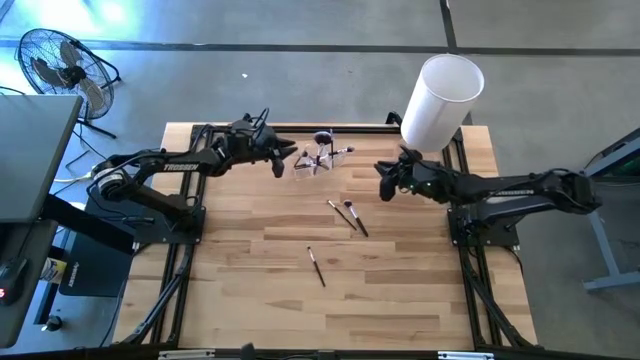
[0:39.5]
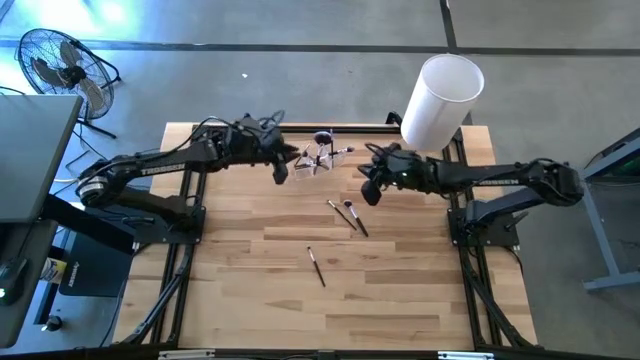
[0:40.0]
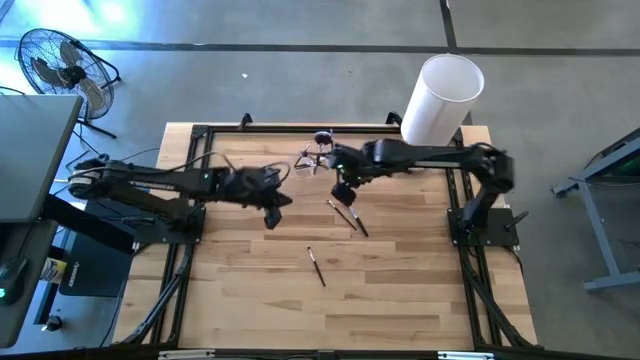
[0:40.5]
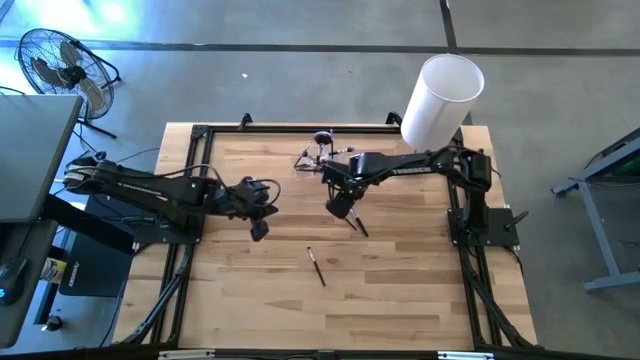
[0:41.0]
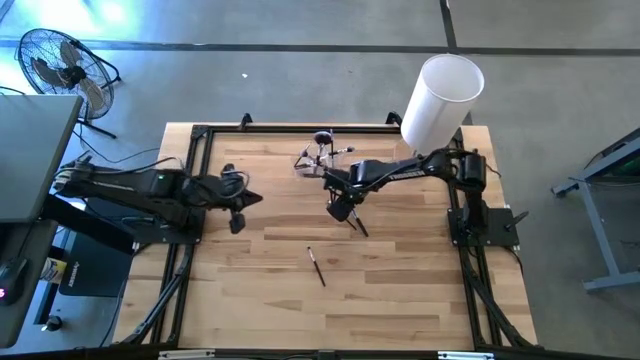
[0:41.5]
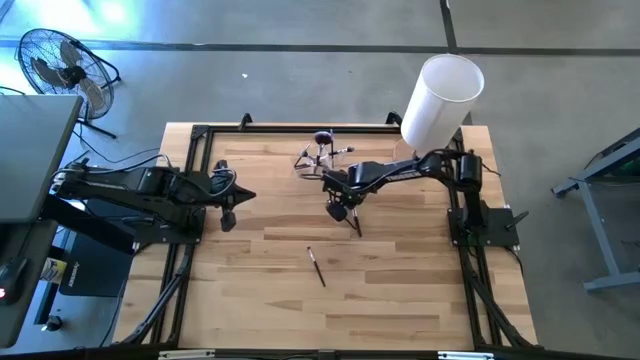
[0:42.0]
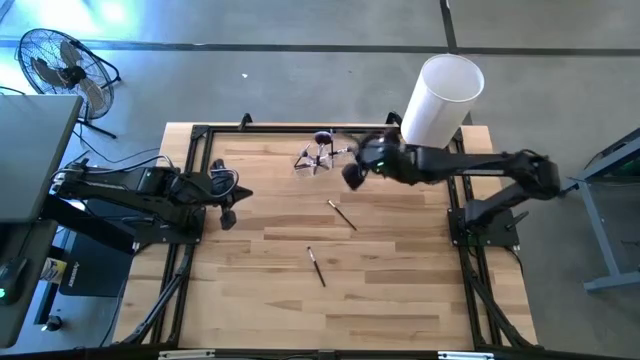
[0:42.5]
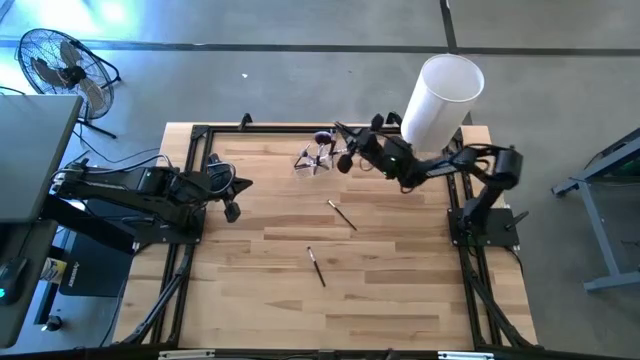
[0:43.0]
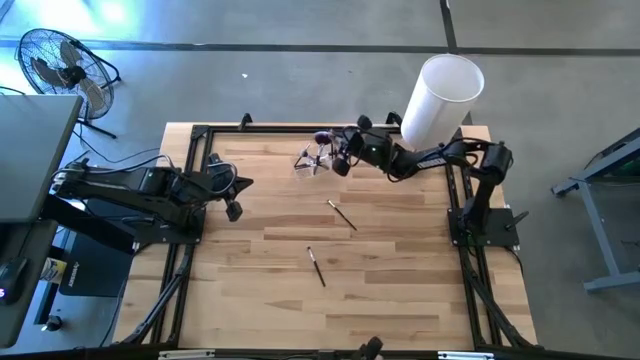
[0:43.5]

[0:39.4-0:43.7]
Task: Put items in baskets/containers
Put the black powder brush into the transparent organizer

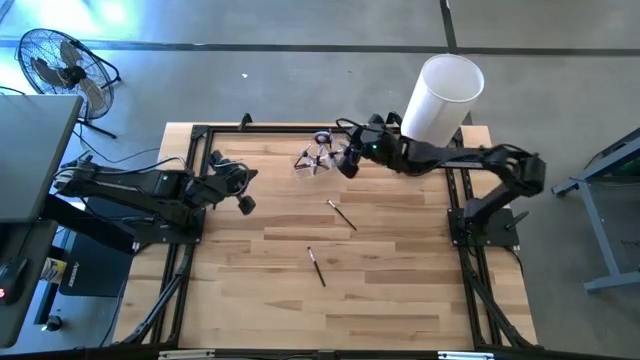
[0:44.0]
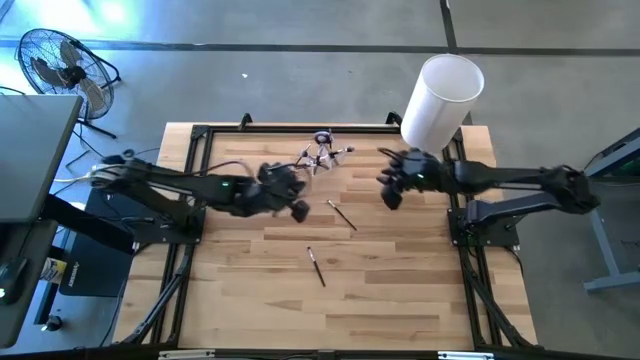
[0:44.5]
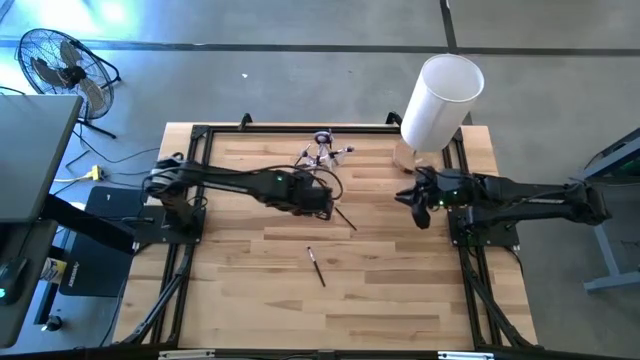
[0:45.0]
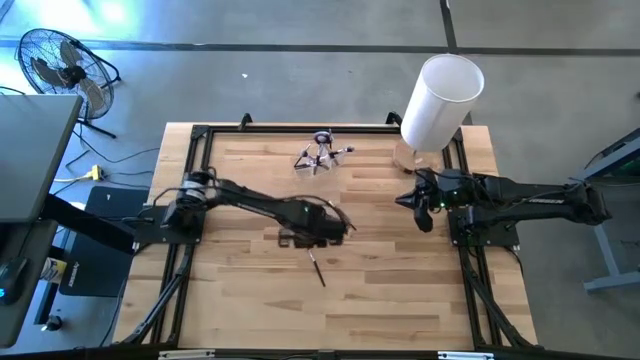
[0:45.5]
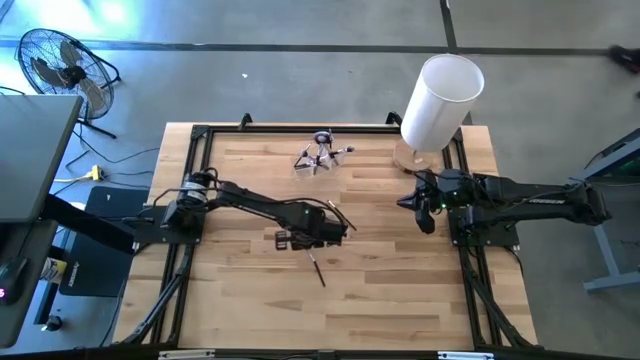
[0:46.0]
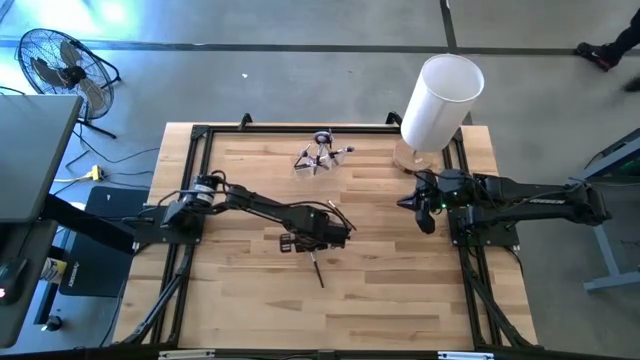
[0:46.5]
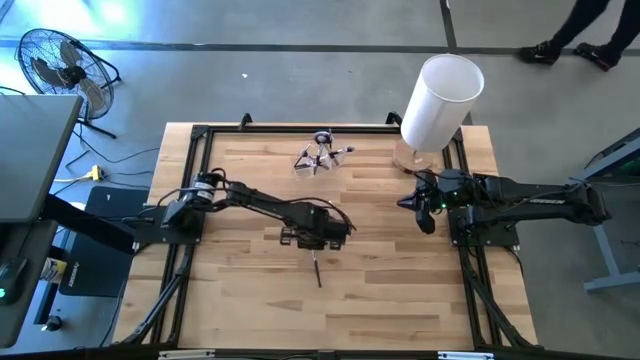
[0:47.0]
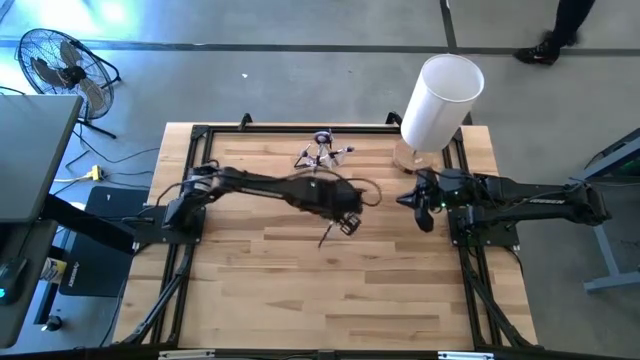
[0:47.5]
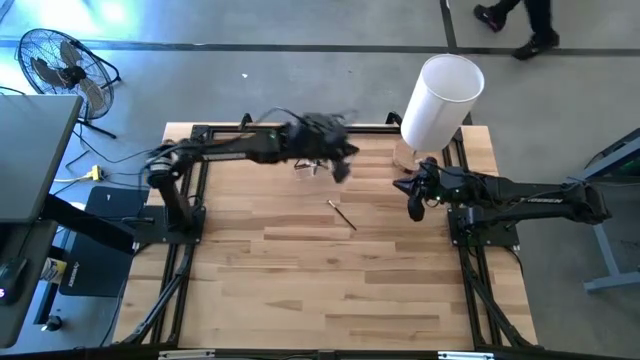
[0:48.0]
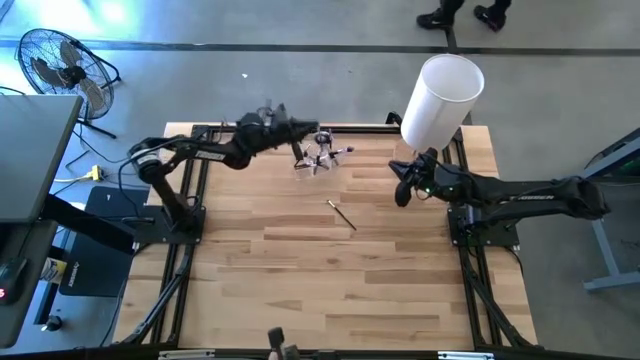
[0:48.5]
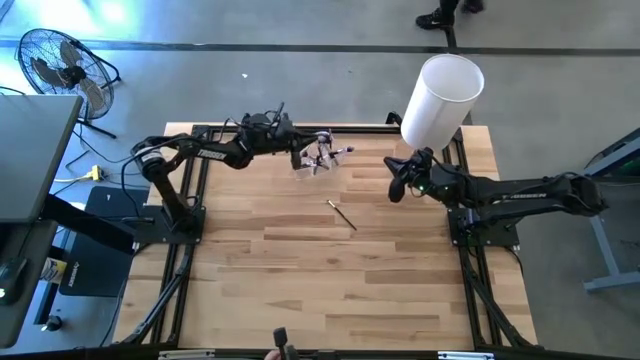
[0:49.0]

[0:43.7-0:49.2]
Put the black eyeshadow brush into the transparent organizer

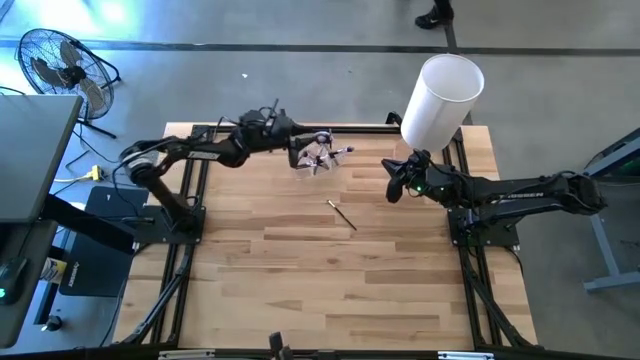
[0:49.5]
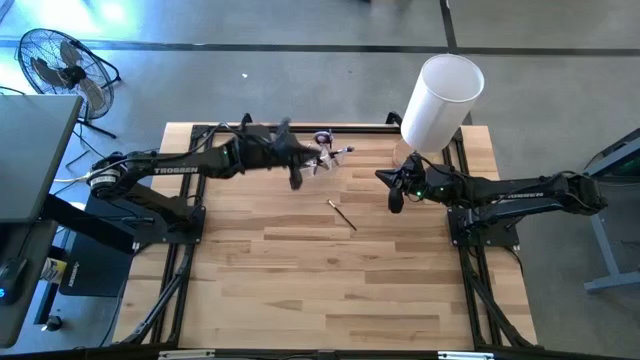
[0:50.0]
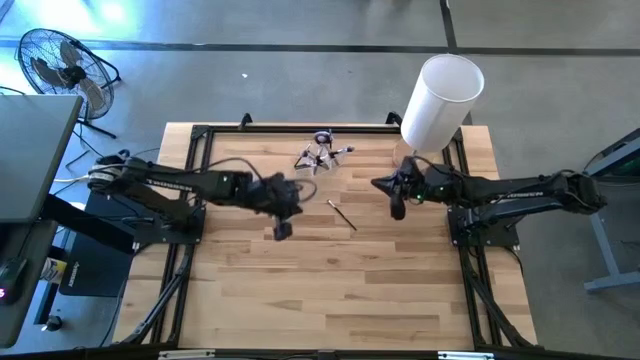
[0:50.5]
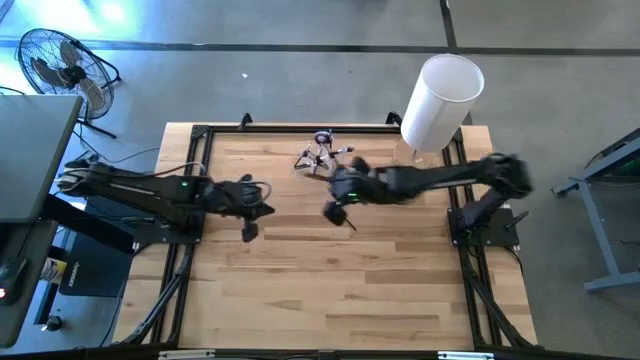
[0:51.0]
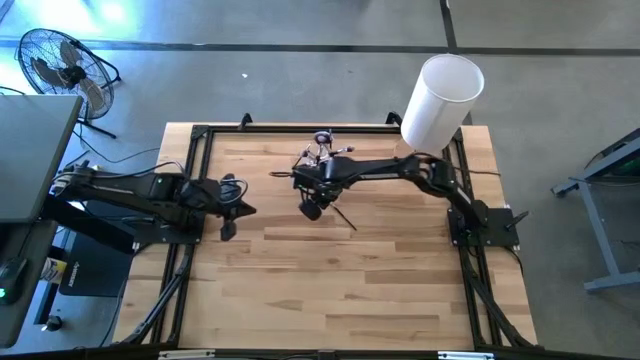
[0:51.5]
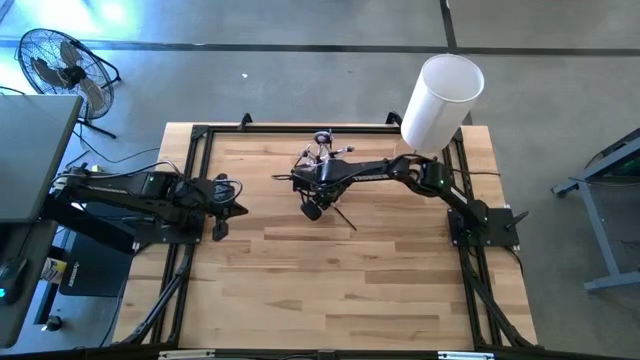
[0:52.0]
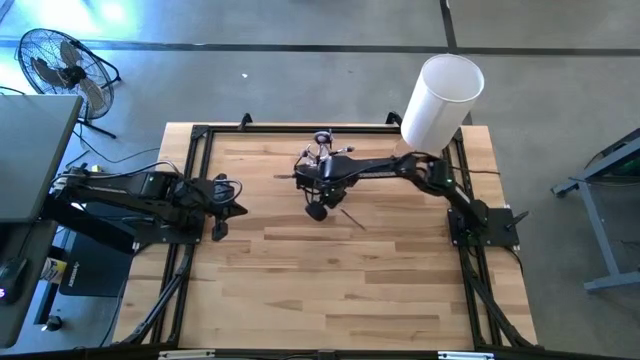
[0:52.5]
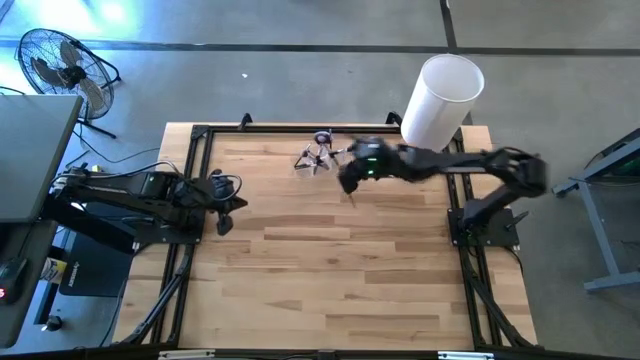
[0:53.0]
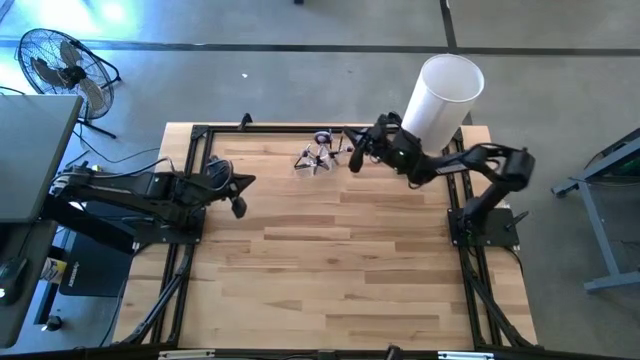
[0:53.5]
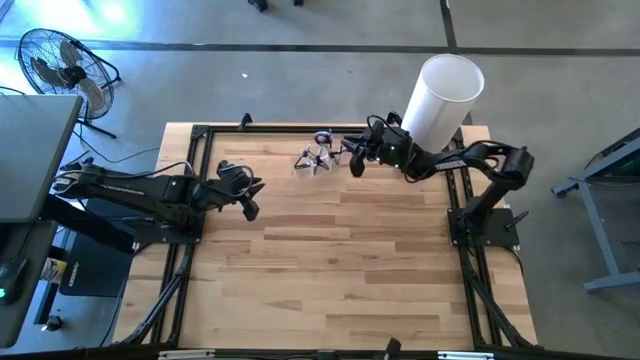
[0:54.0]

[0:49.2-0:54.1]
Put the black eyeshadow brush into the transparent organizer

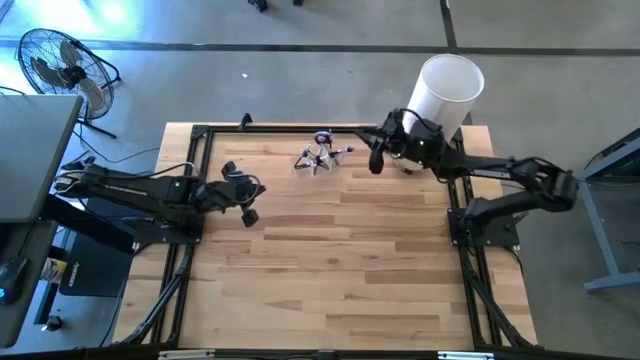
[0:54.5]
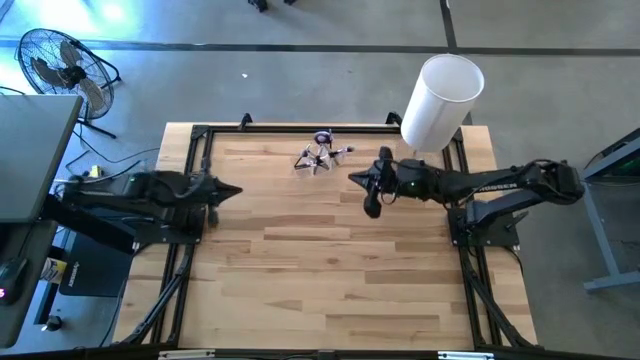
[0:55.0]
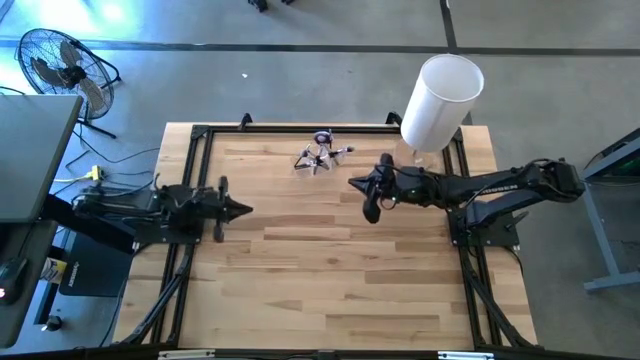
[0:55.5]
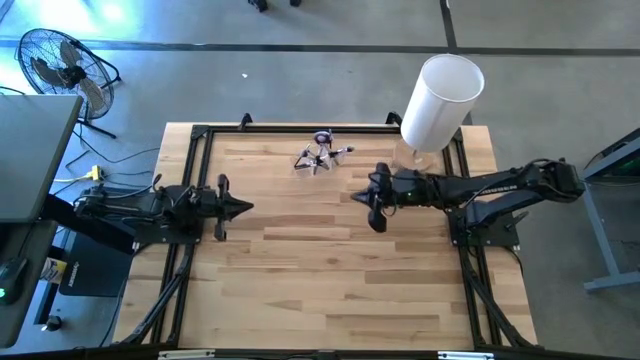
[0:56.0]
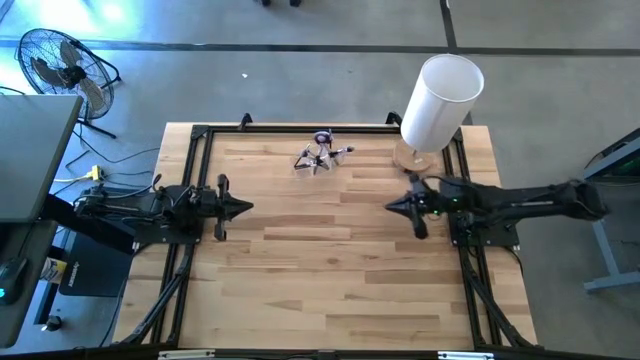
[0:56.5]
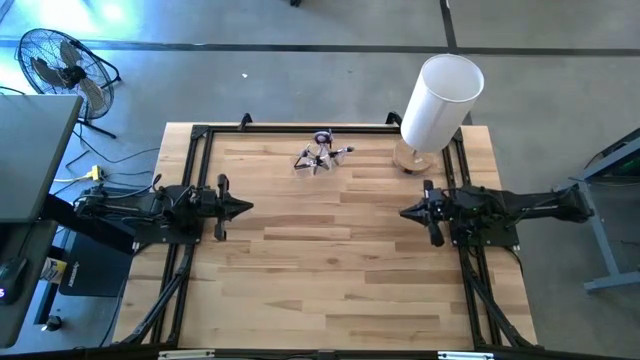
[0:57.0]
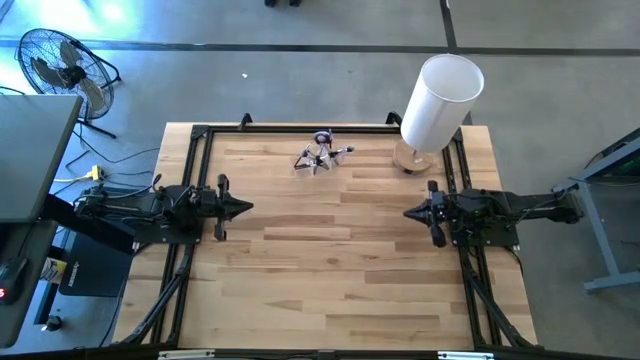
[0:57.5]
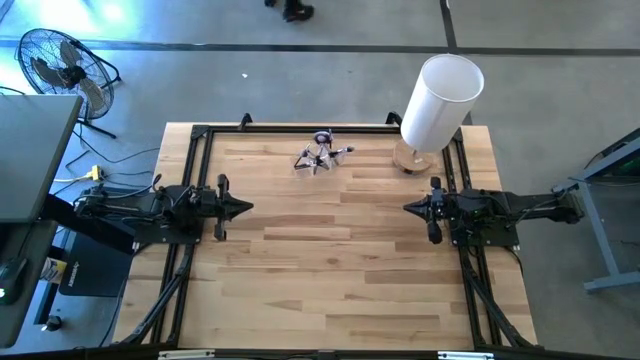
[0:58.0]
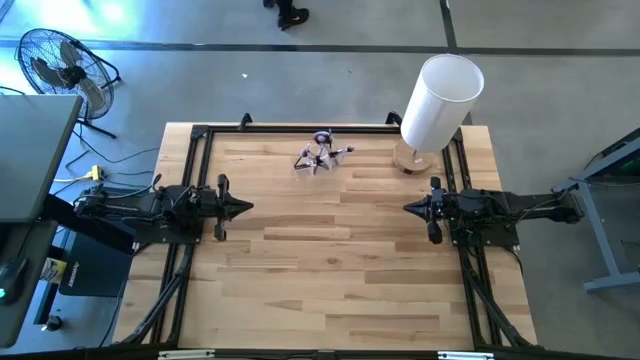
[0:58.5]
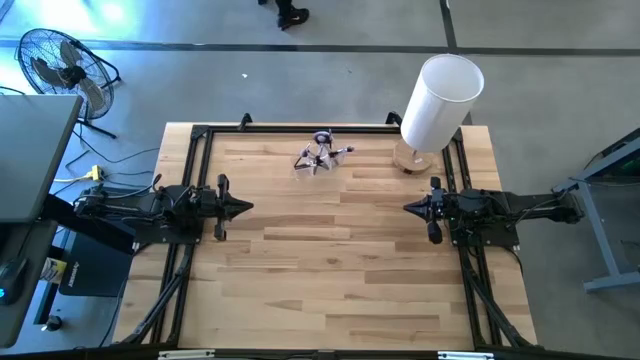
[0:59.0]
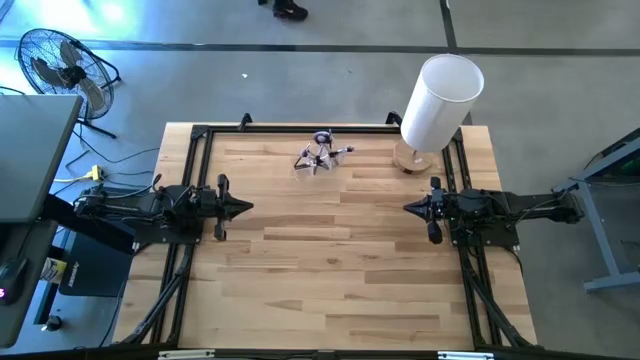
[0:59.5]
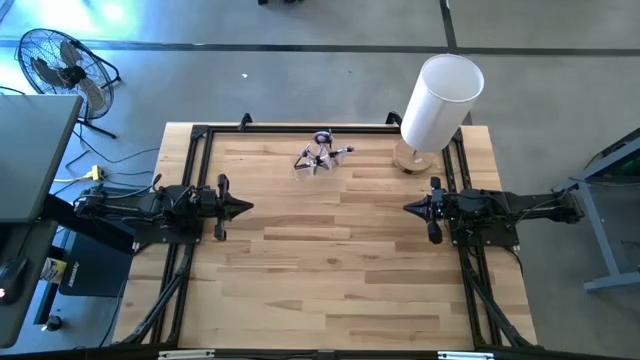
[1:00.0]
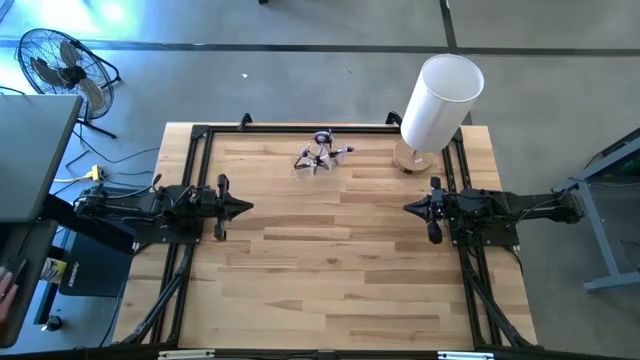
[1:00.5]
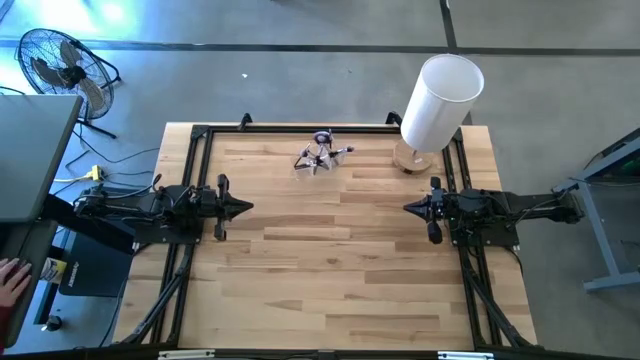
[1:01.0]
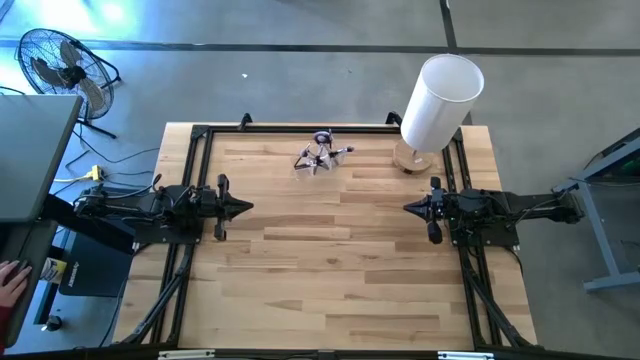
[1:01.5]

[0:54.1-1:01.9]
Return to Home Position
